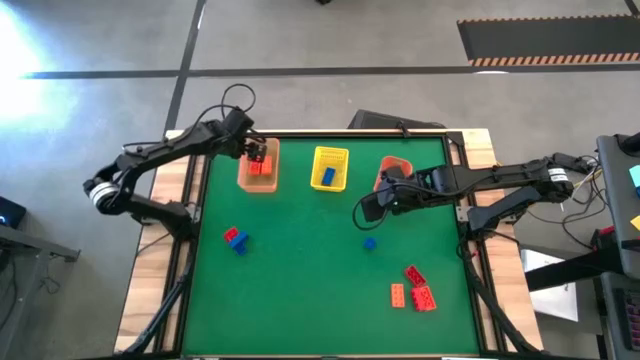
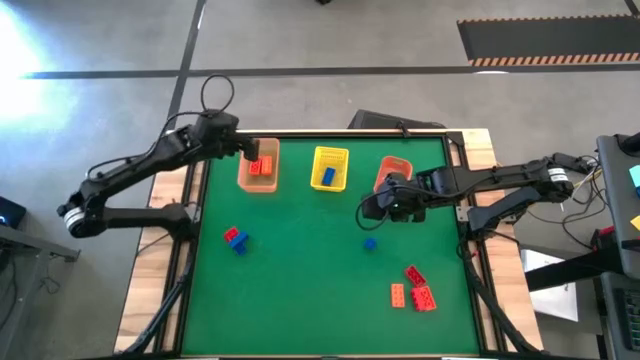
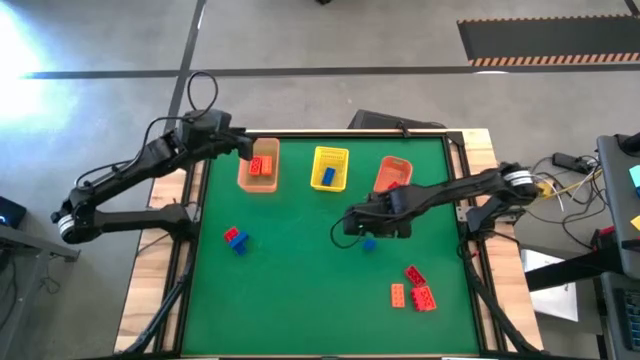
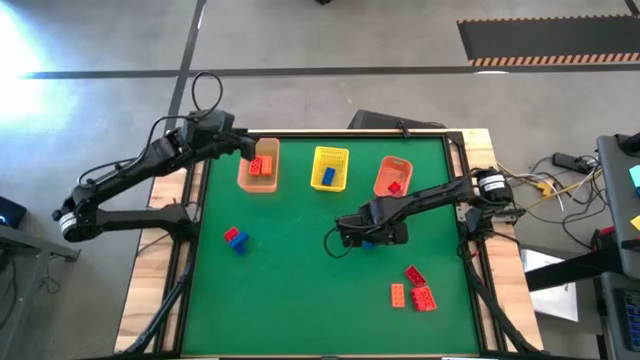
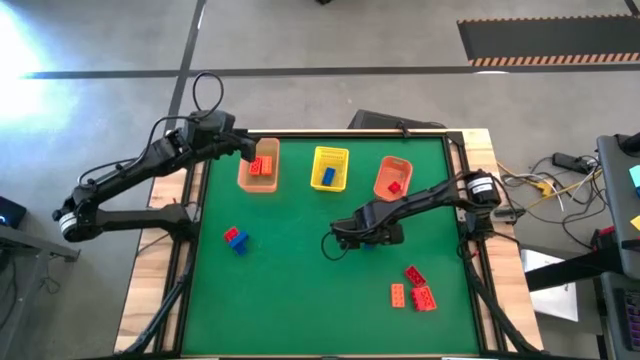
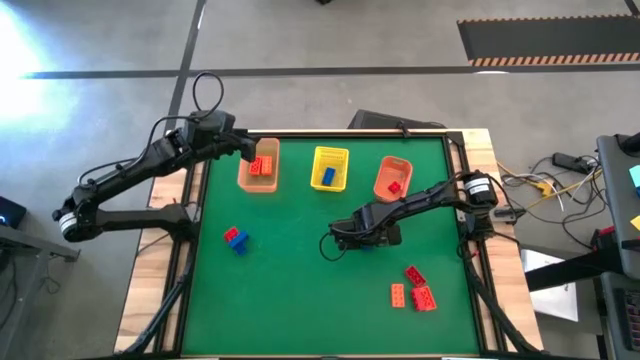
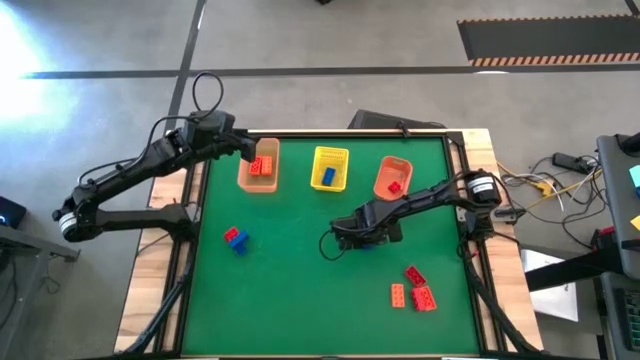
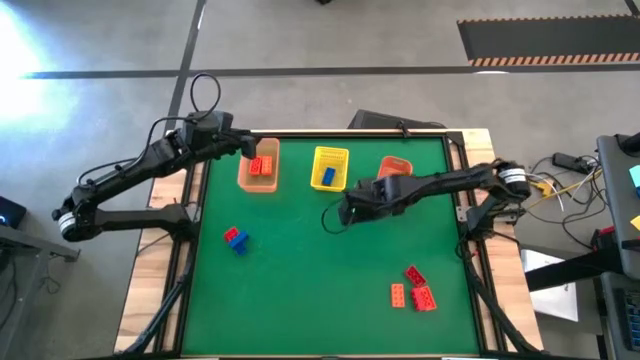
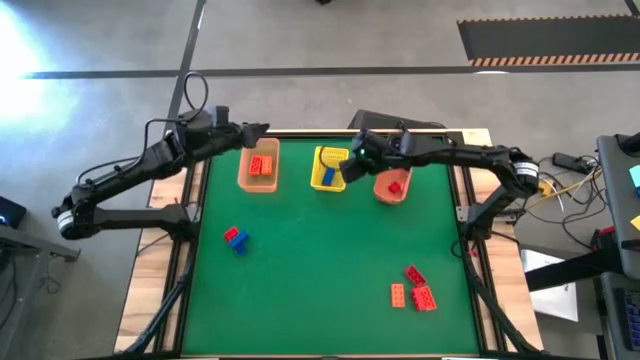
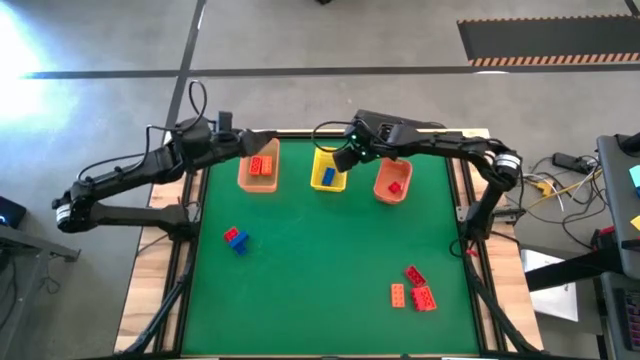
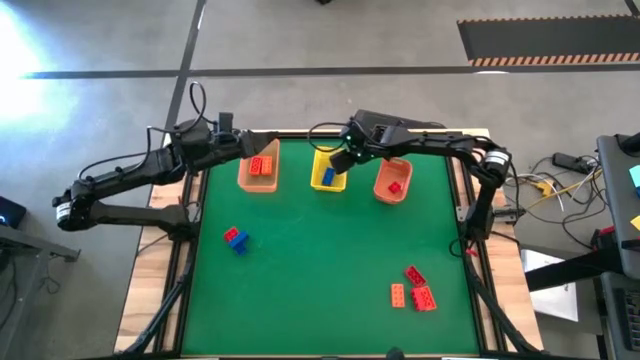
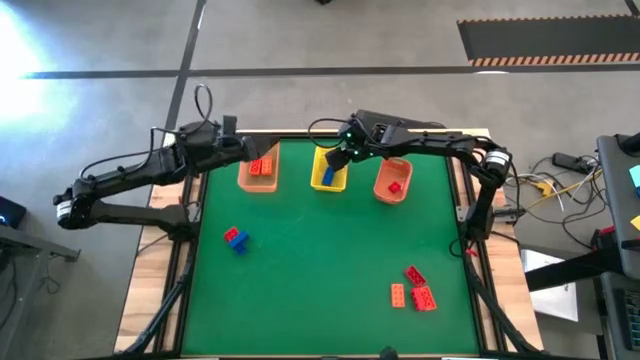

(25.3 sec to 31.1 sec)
Task: Sort & place blocks by color
Put the blue game piece into the yellow bin

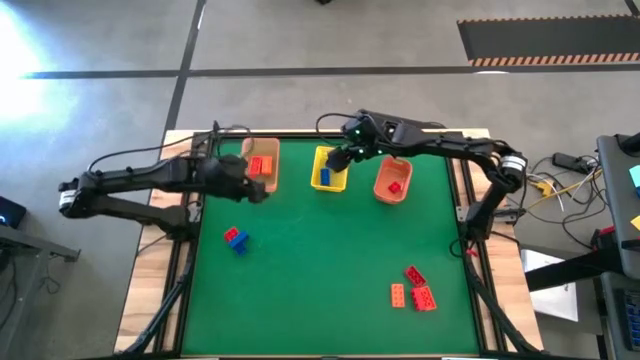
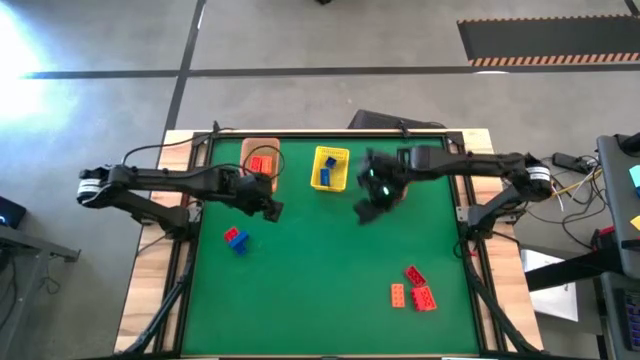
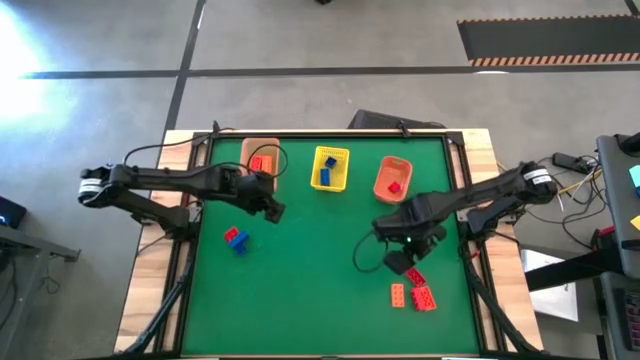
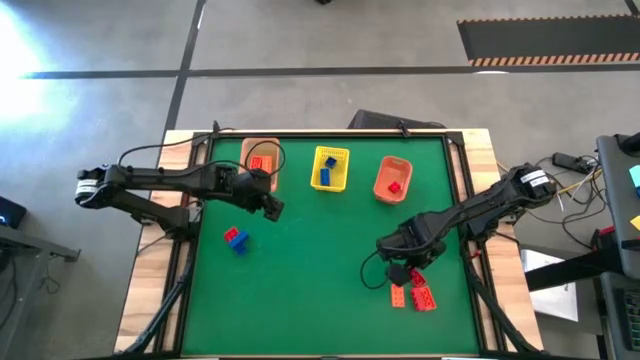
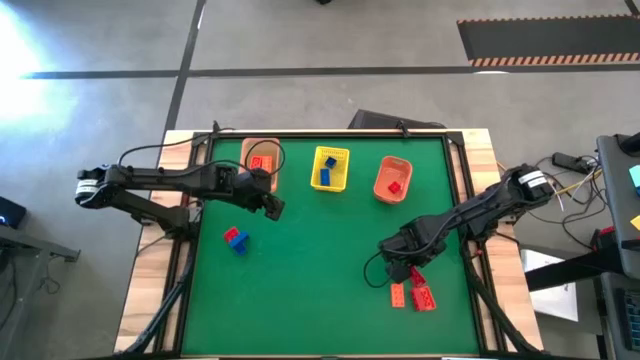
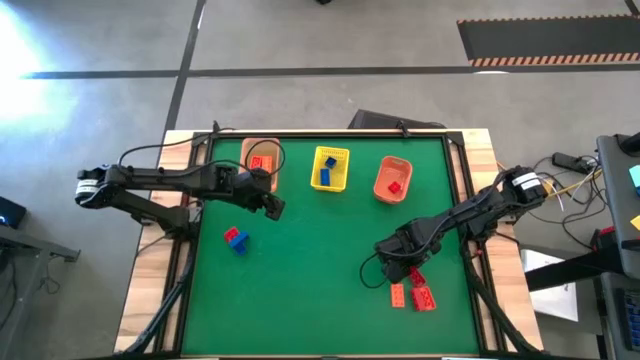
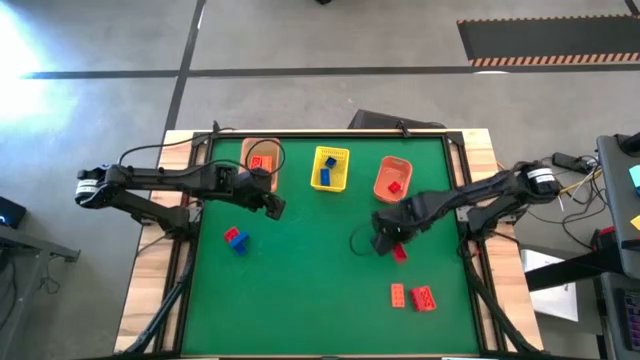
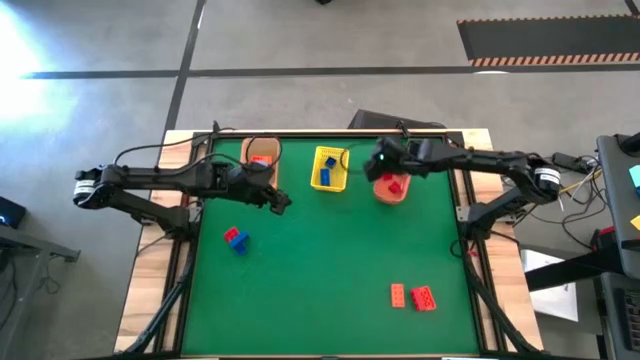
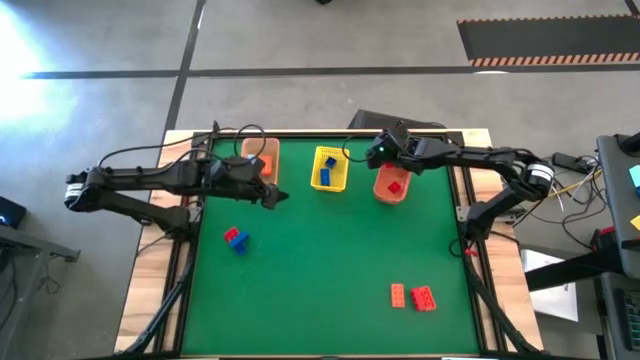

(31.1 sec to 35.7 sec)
Put the red game piece into the orange bin

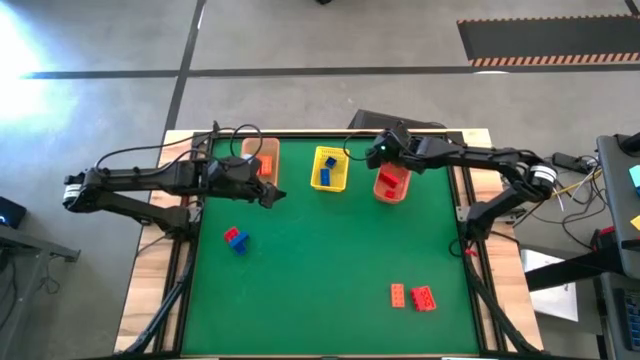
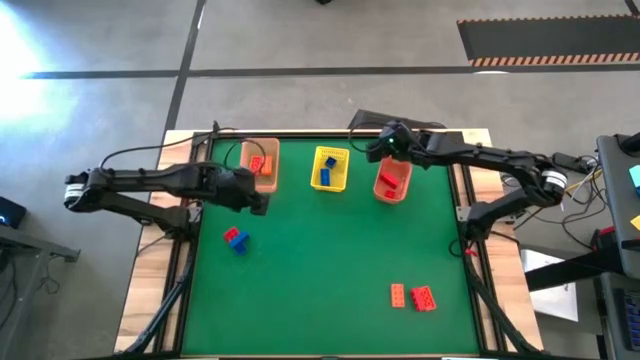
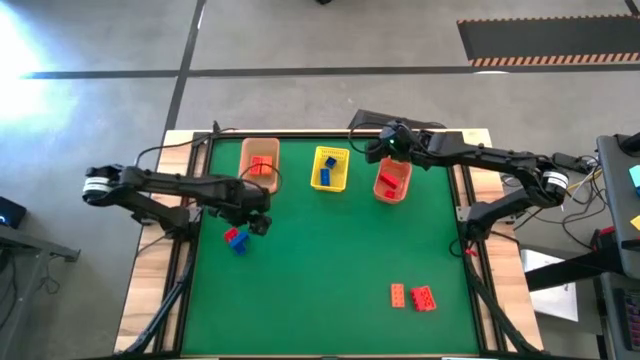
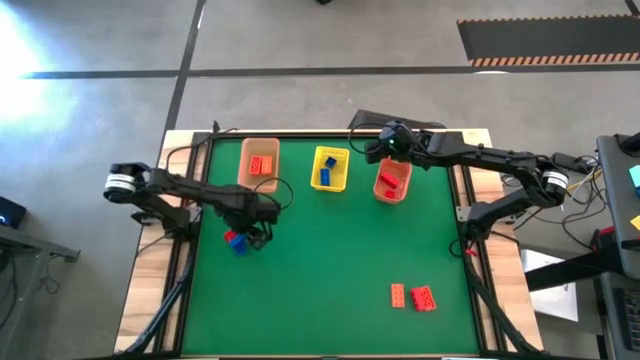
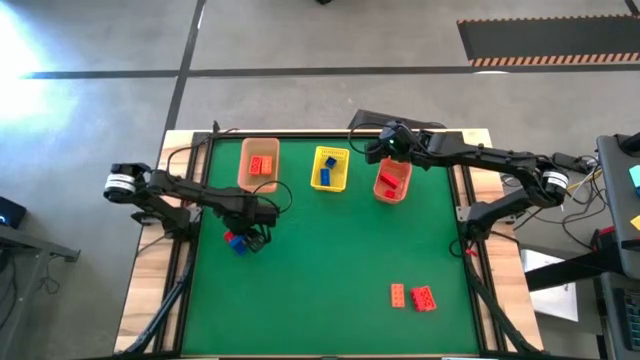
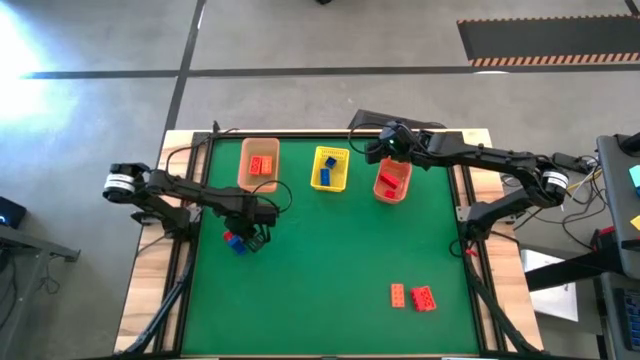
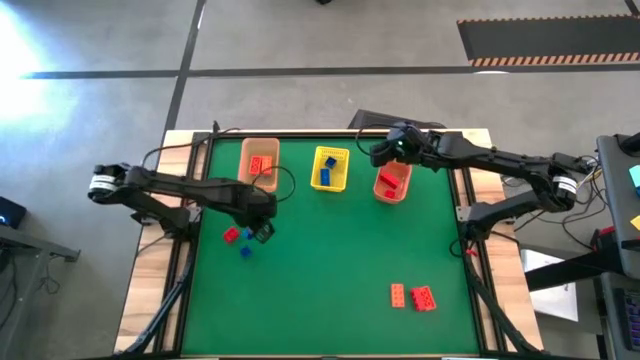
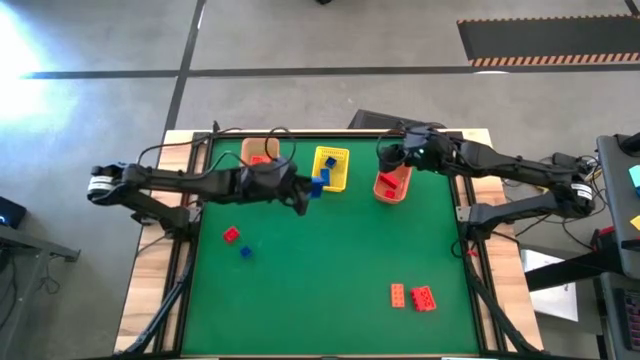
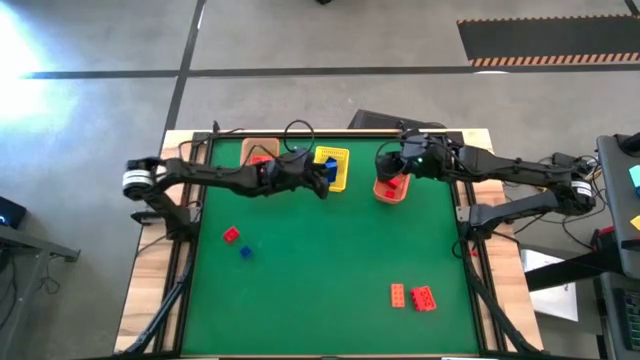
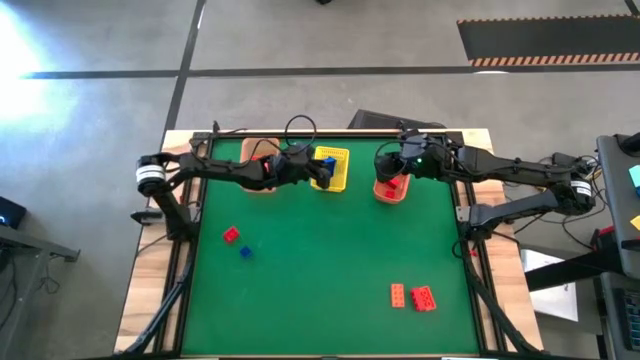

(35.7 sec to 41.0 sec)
Put the blue game piece into the yellow bin

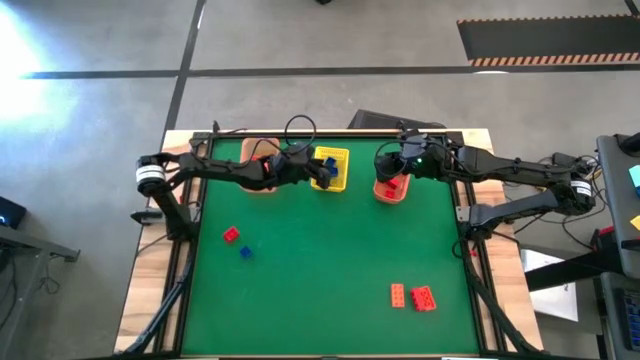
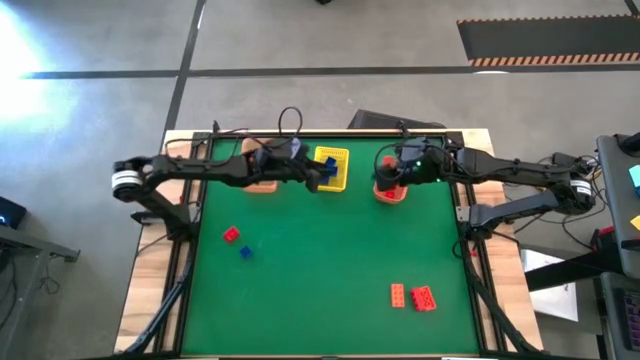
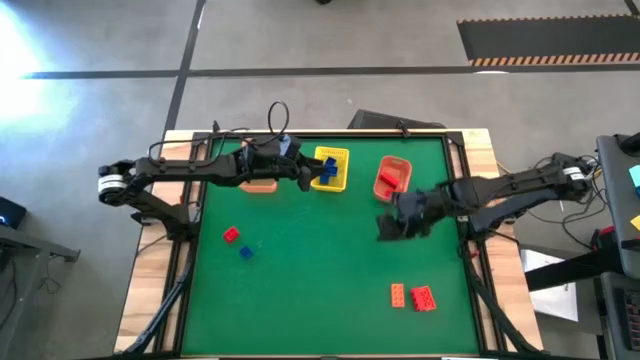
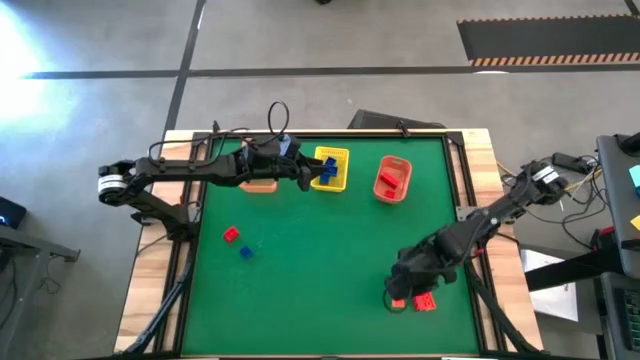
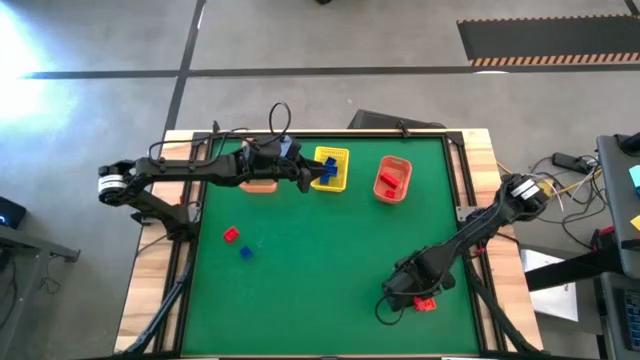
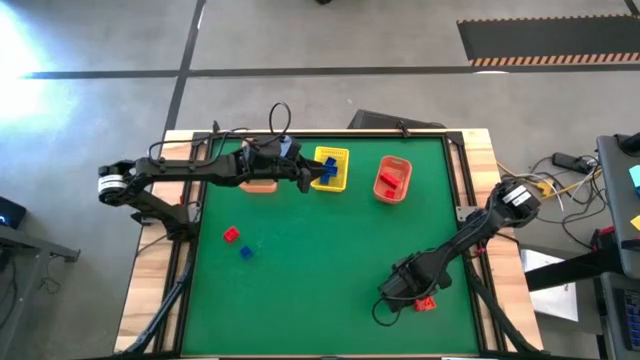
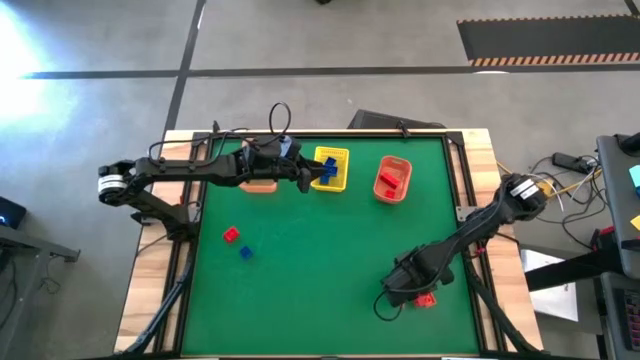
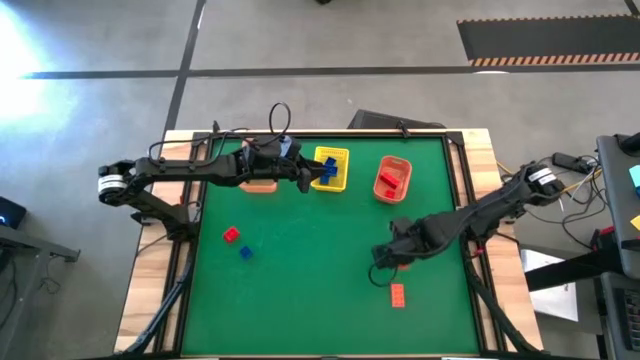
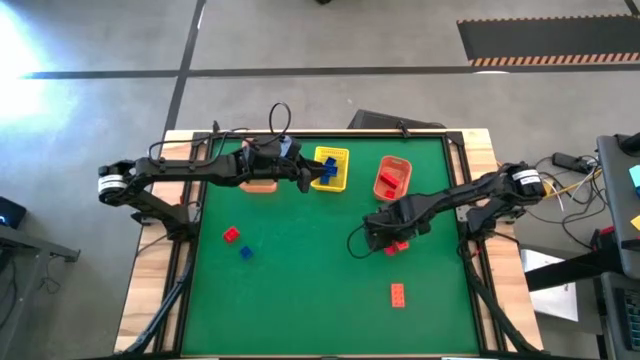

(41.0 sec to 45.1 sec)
Put the red game piece into the orange bin

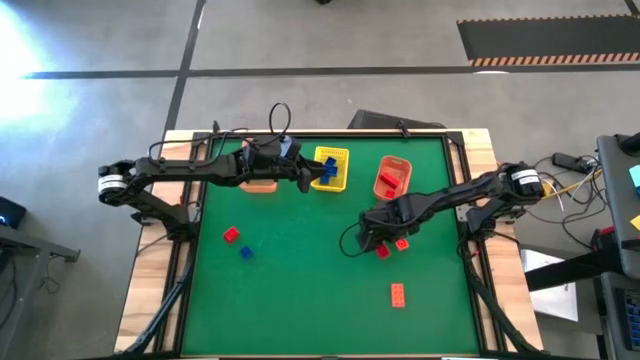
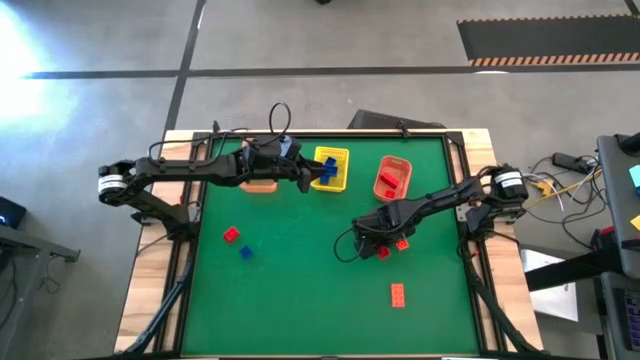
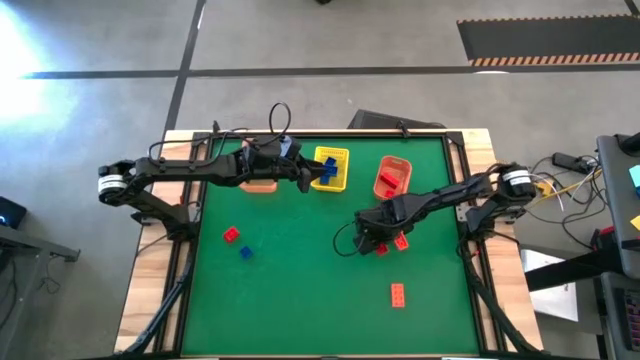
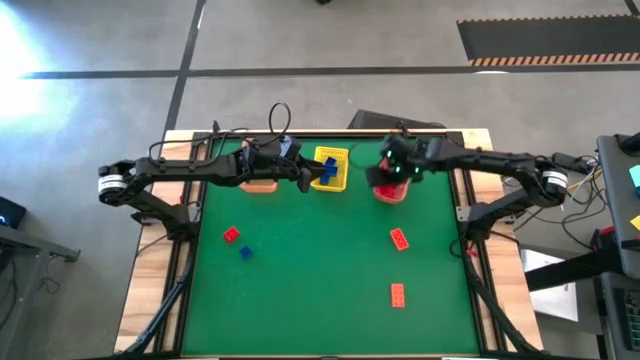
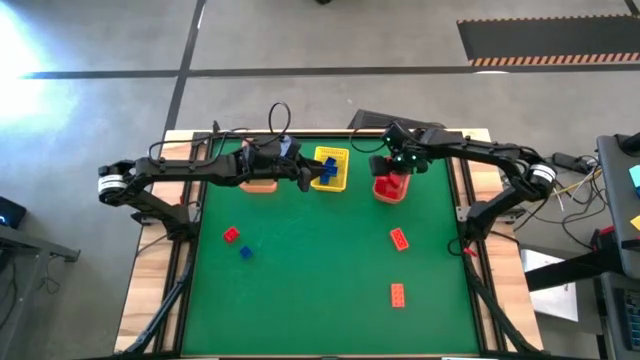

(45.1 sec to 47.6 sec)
Put the red game piece into the orange bin
